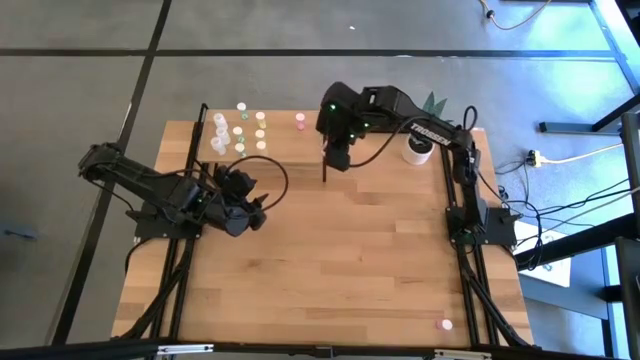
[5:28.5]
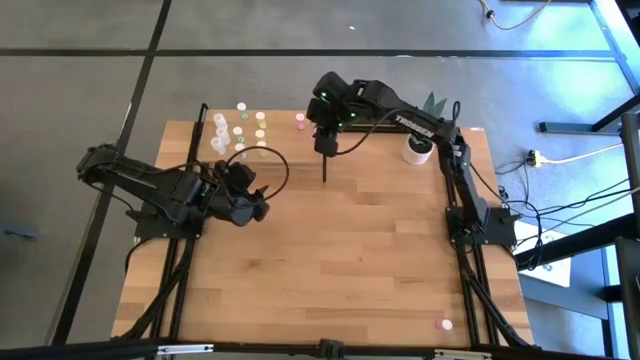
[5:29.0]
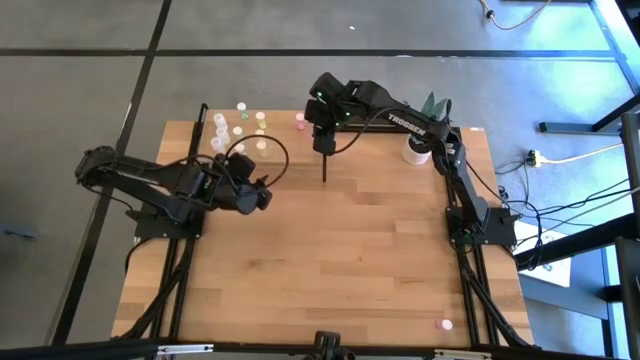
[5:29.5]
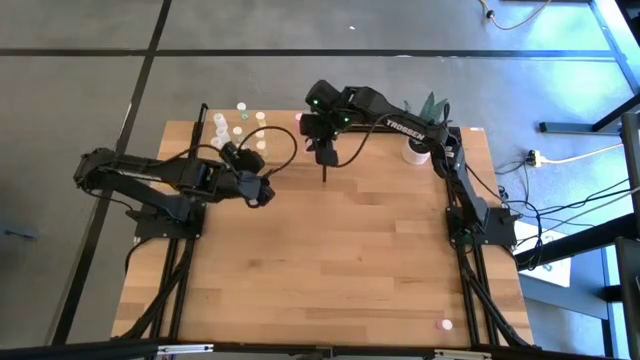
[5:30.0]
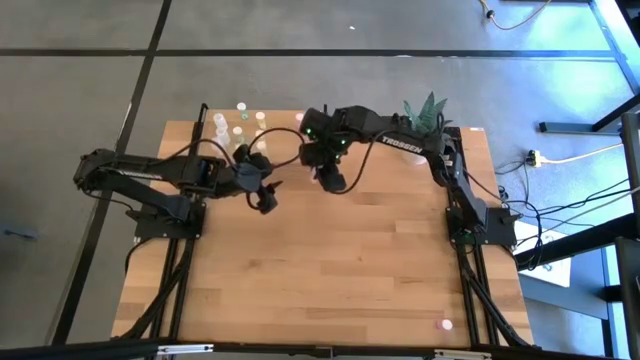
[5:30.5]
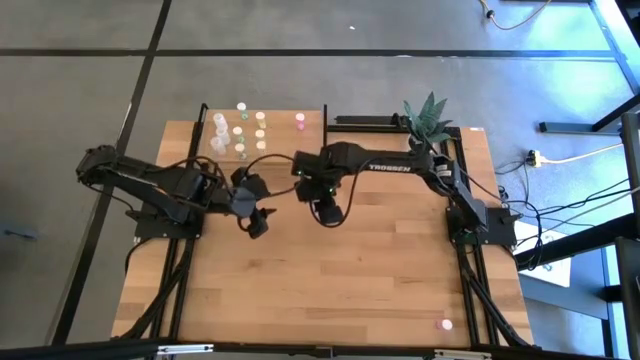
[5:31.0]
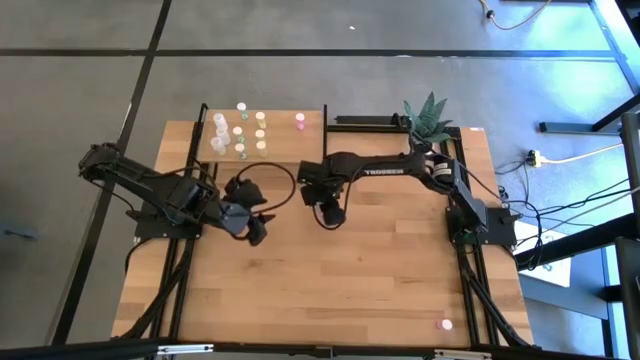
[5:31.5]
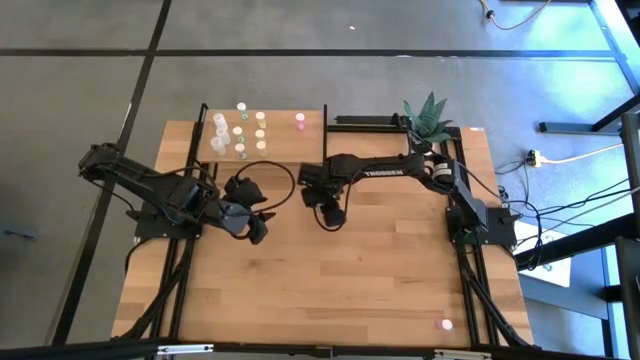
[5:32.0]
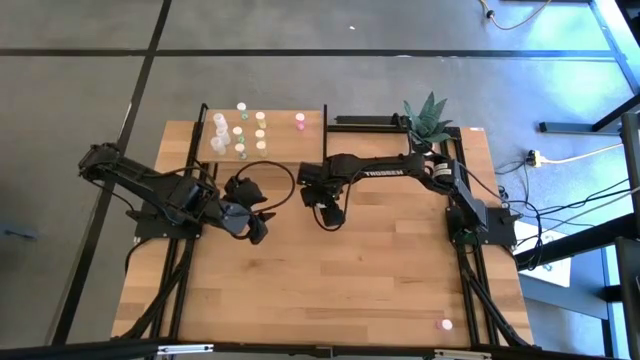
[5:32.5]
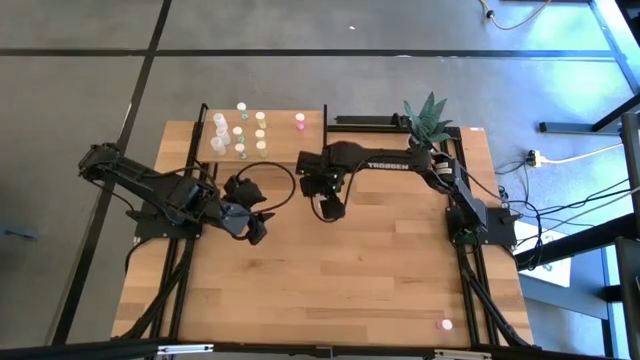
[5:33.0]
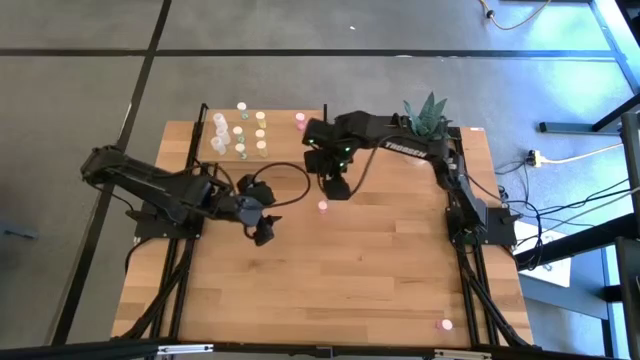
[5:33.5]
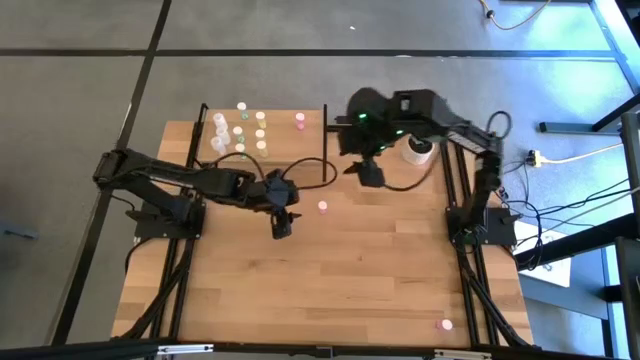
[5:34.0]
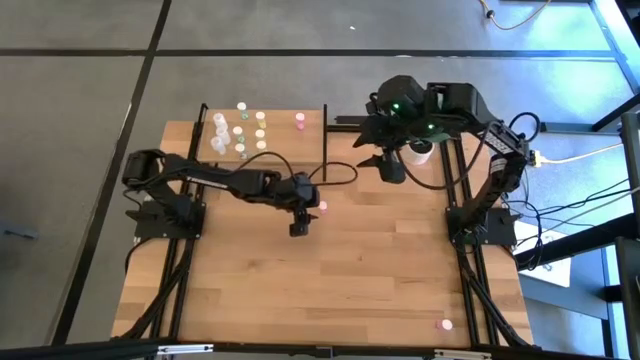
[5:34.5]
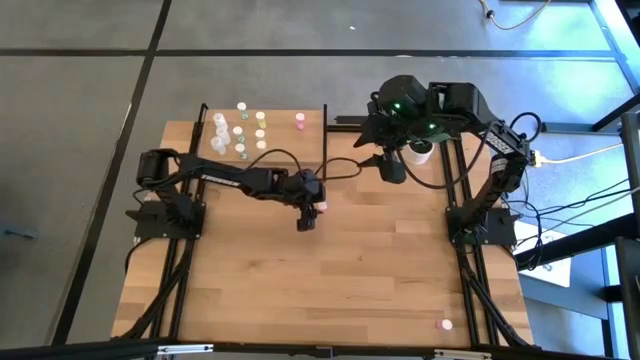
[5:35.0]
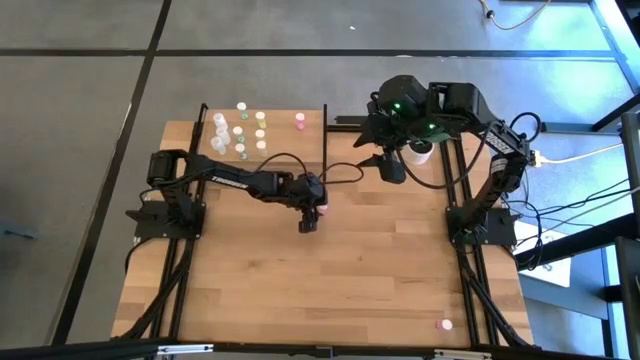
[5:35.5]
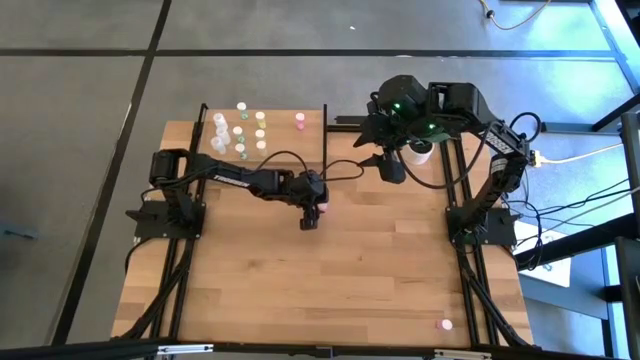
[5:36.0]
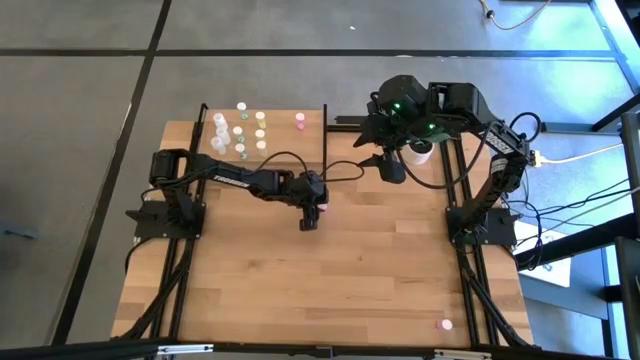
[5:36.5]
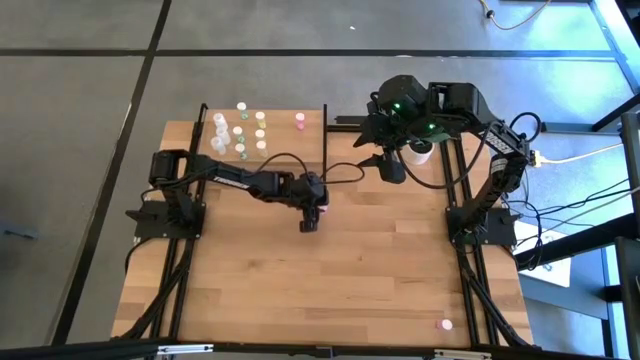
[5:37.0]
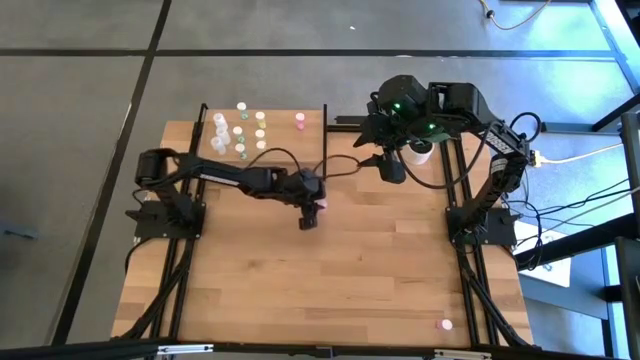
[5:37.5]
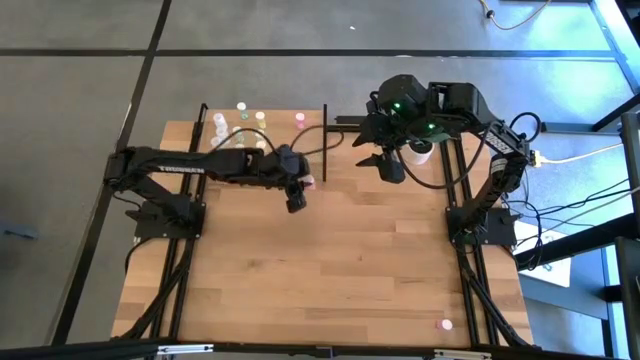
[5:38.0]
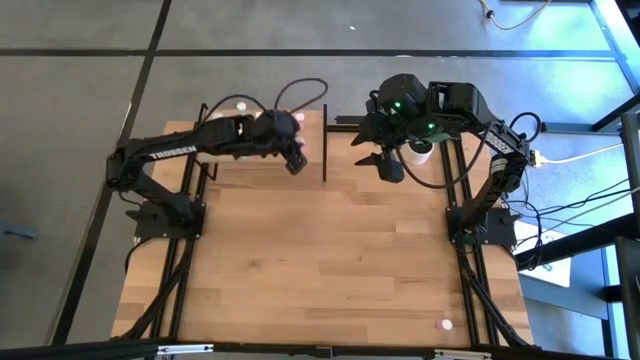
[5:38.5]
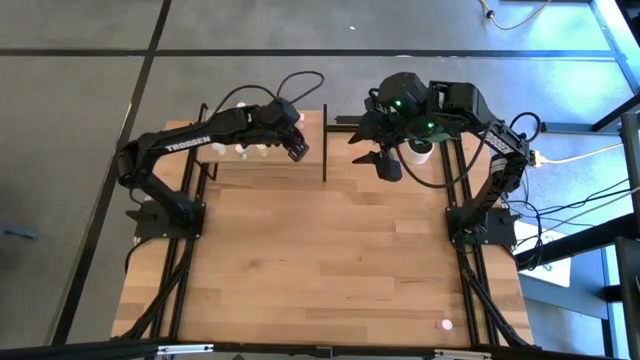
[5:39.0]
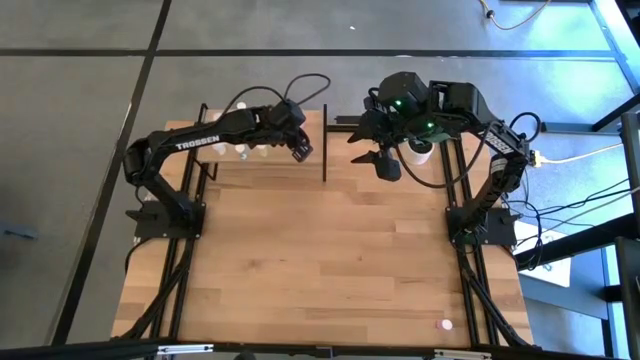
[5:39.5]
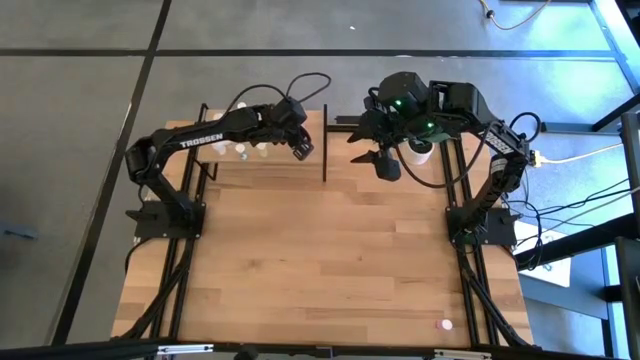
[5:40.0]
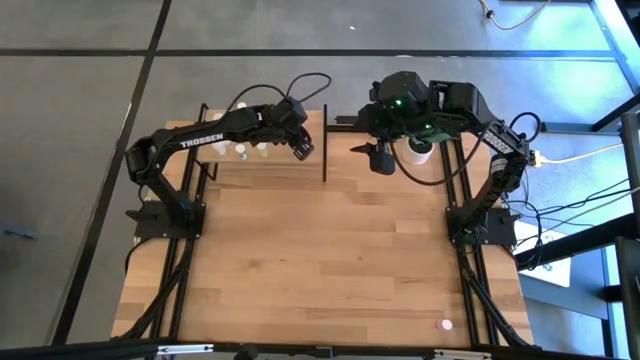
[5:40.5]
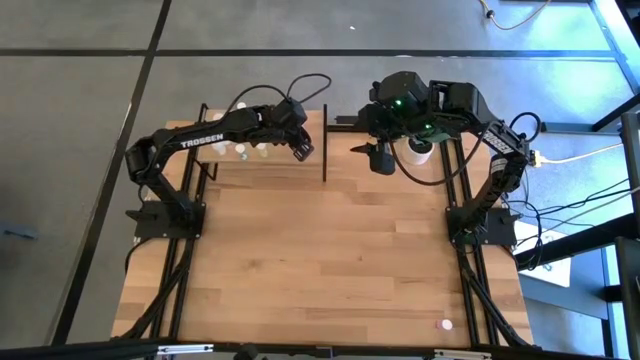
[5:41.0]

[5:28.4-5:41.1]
Task: Pick and place medicine bottles onto shelf by color
Put the top pink pill bottle aligned with the other pink pill bottle on the shelf

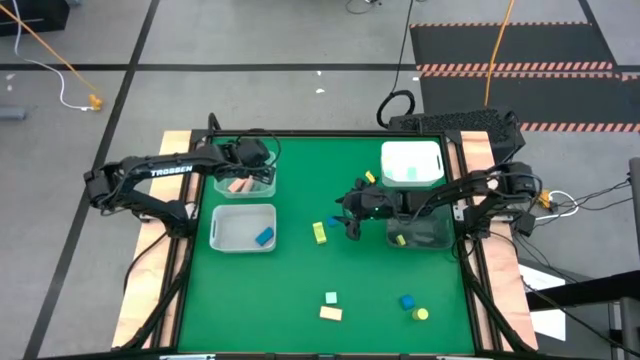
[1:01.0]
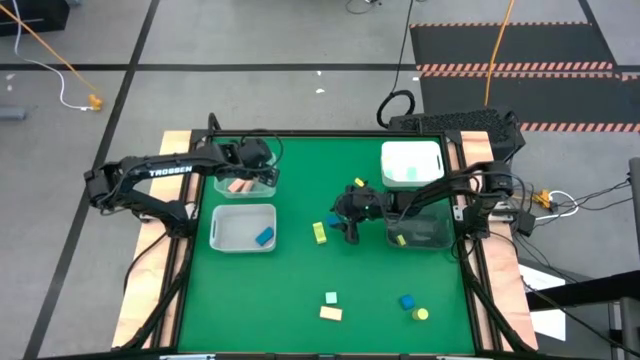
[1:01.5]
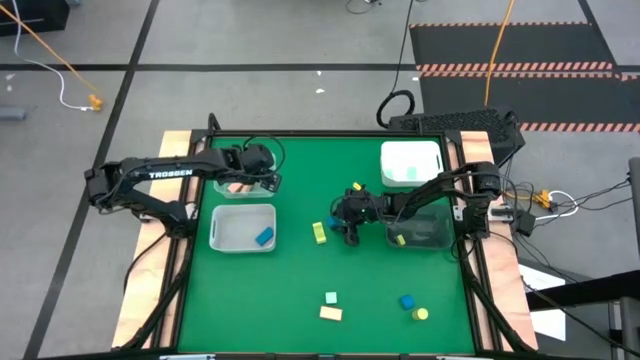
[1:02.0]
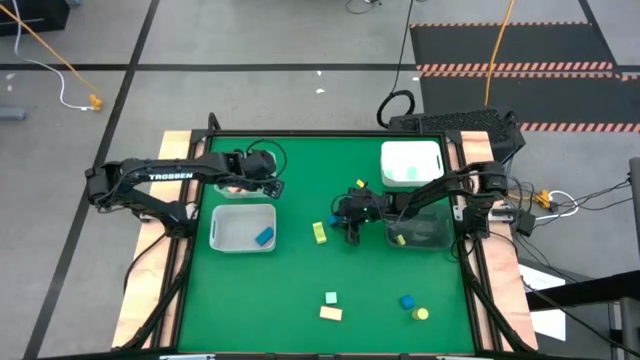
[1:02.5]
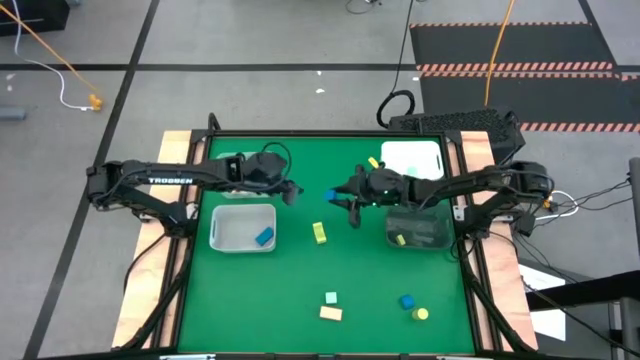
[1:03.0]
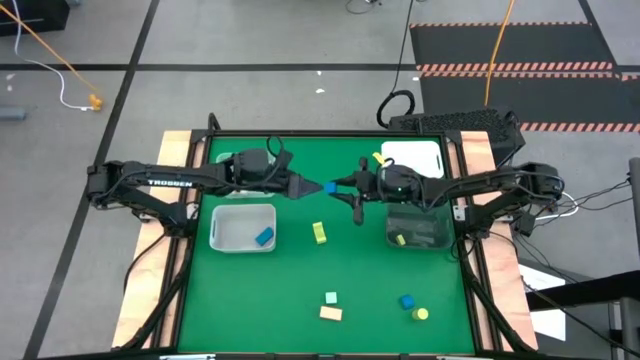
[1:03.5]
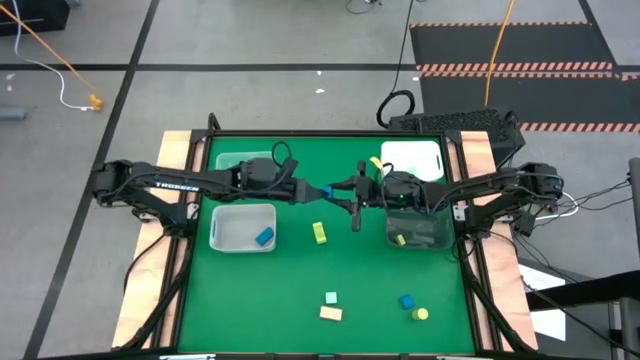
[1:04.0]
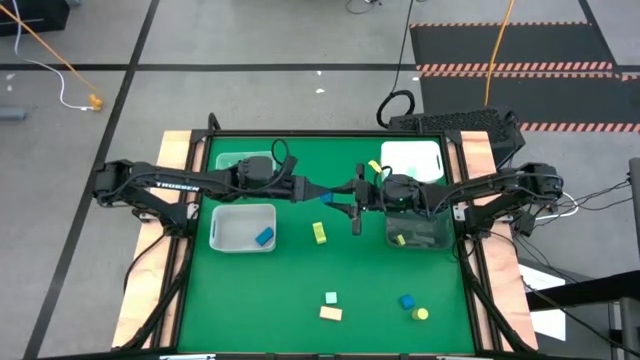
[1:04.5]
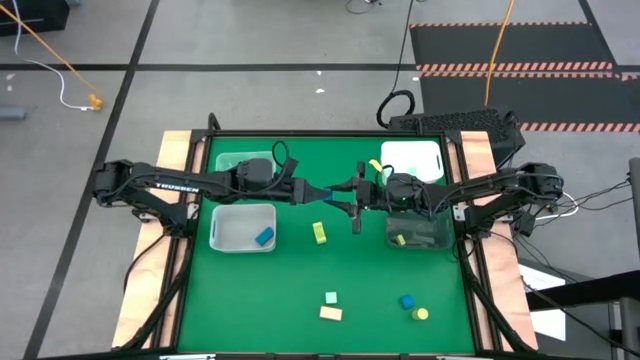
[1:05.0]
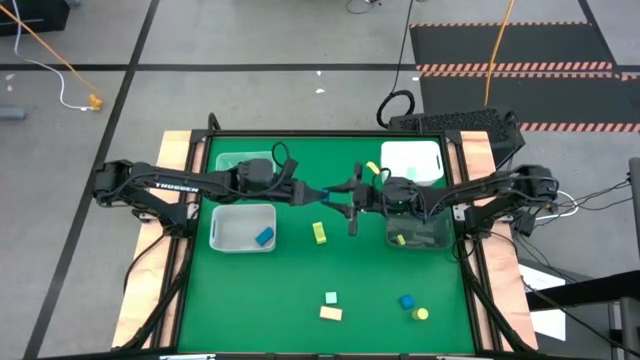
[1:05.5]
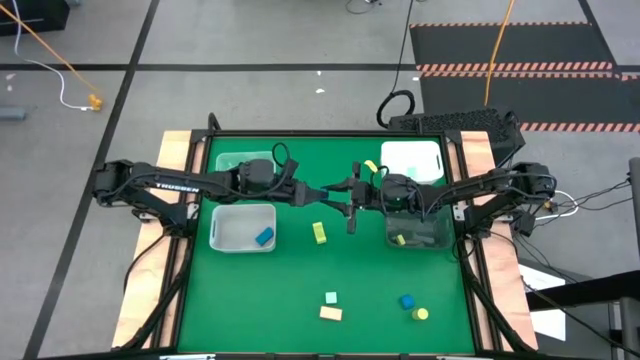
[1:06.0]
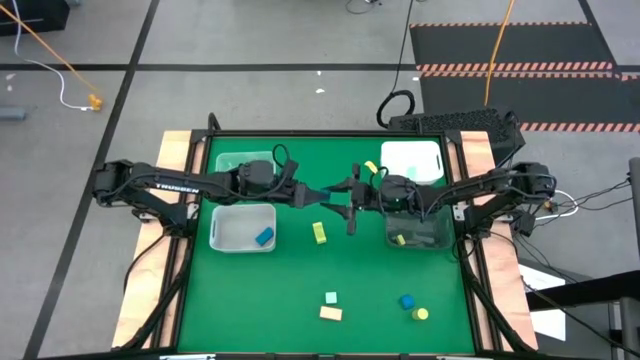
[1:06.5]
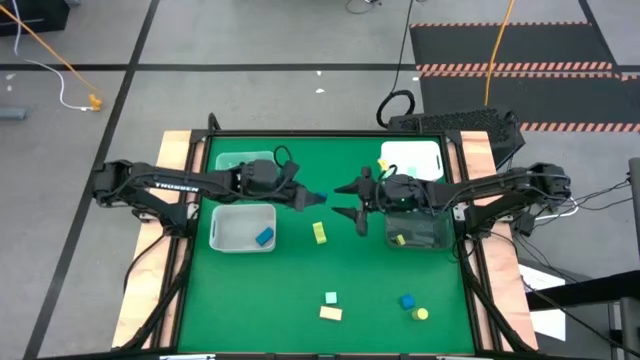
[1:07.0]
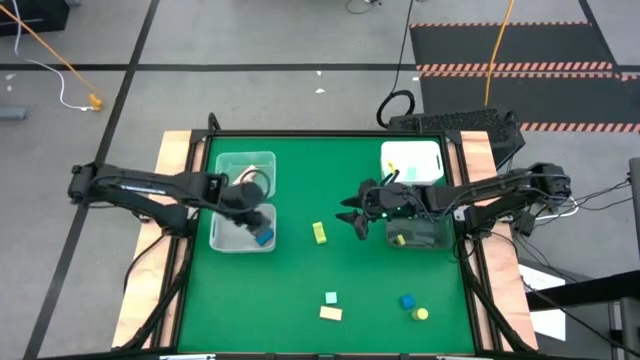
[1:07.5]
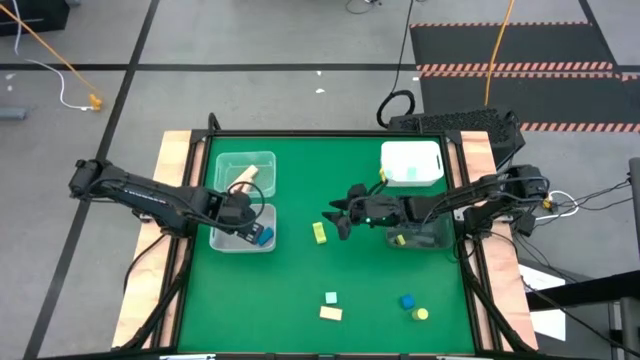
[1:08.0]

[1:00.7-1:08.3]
Task: Sort & place blocks by color
Put the top blue block into the gray bin
